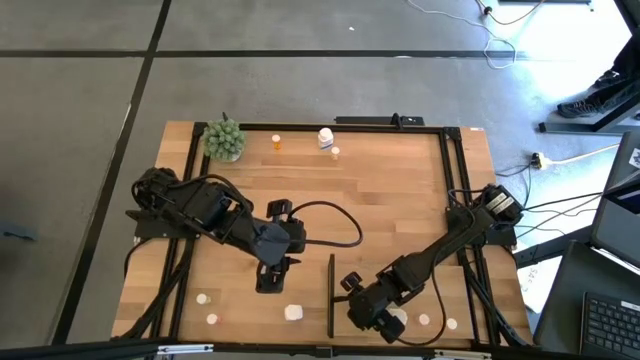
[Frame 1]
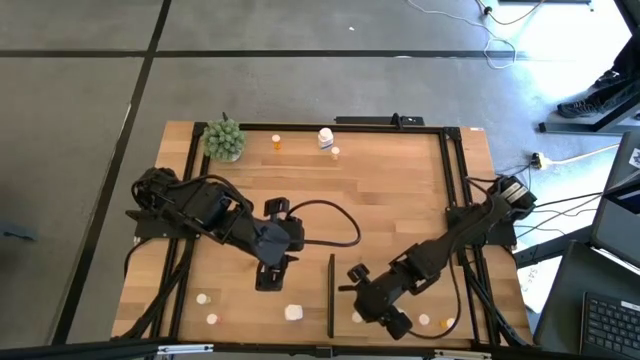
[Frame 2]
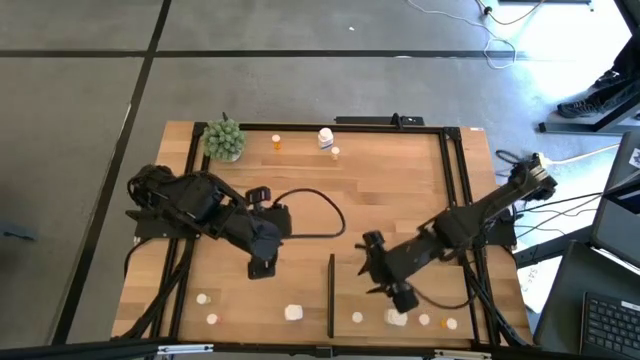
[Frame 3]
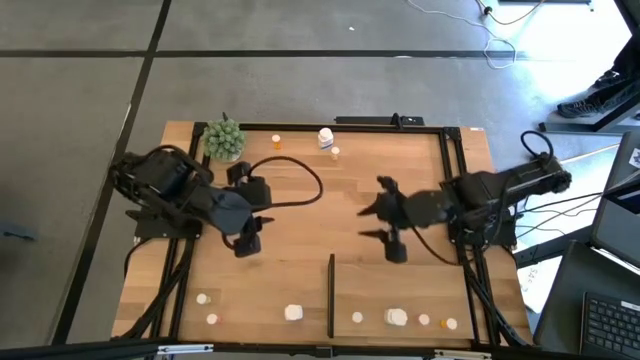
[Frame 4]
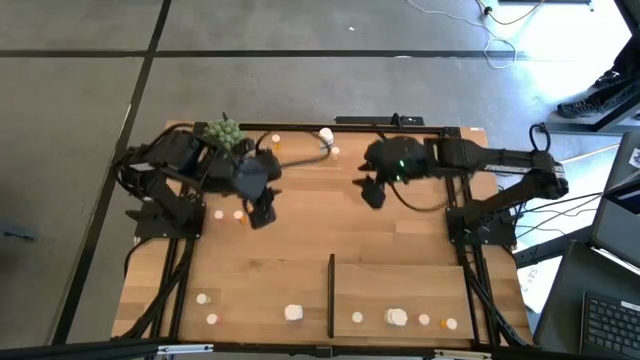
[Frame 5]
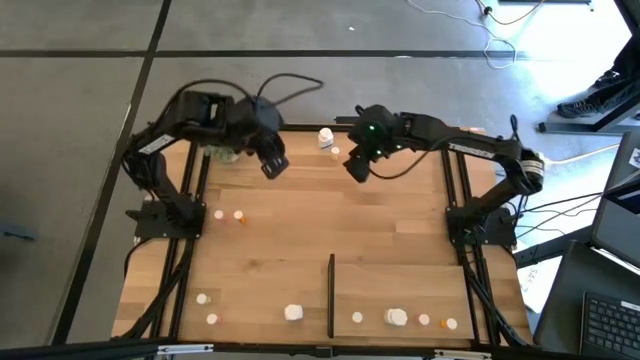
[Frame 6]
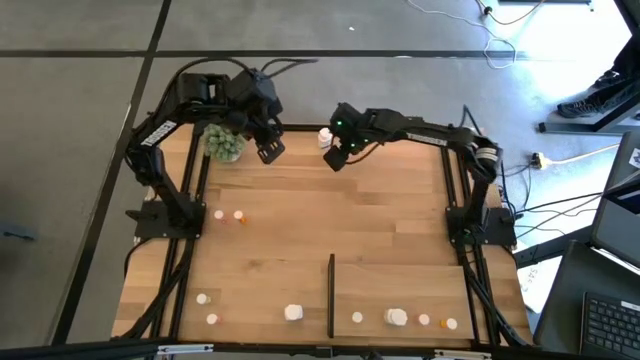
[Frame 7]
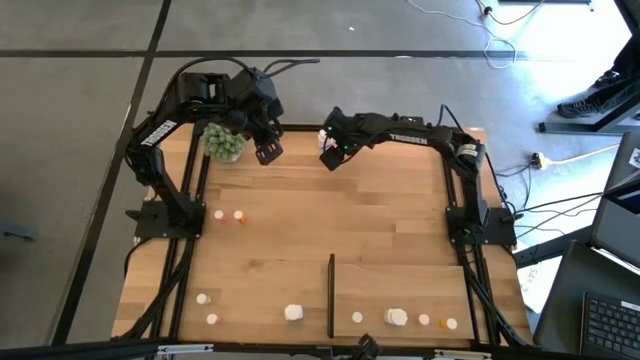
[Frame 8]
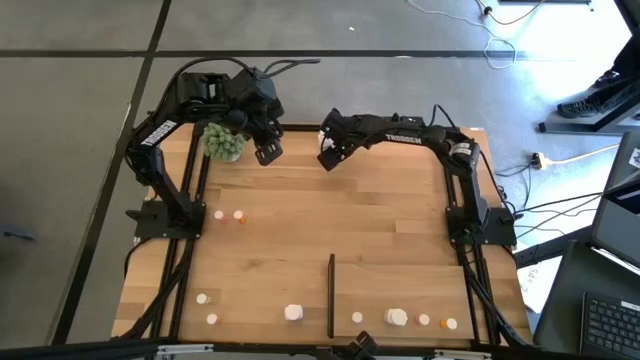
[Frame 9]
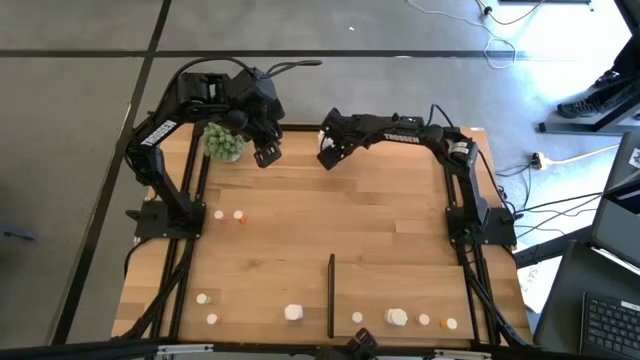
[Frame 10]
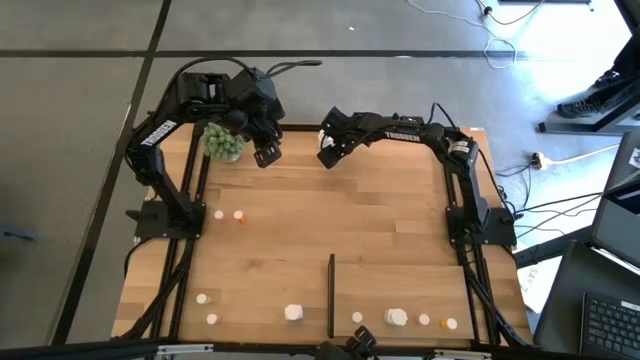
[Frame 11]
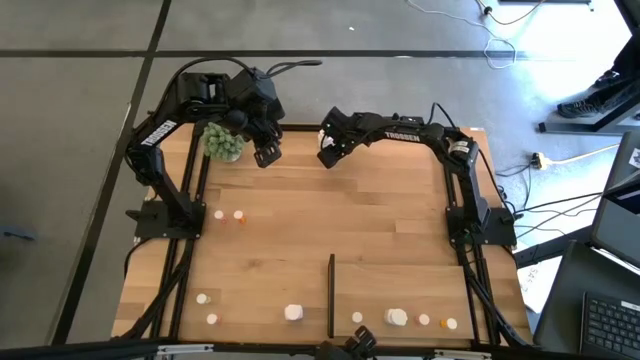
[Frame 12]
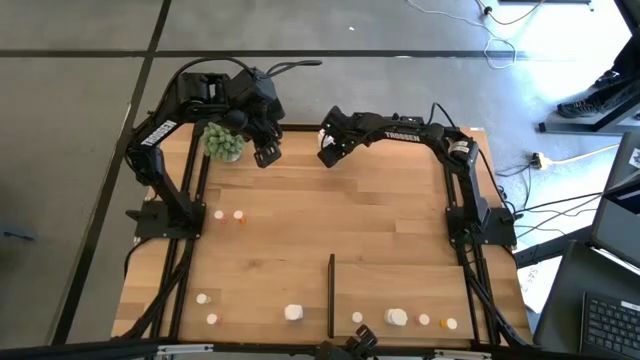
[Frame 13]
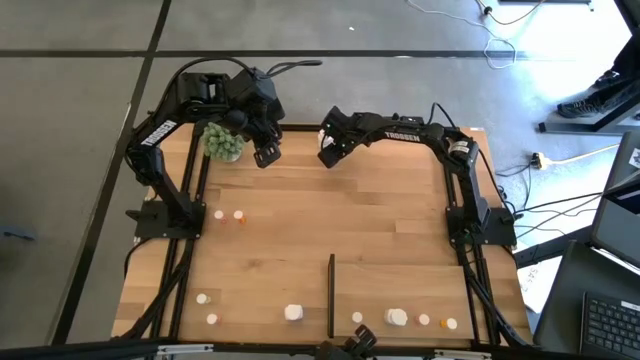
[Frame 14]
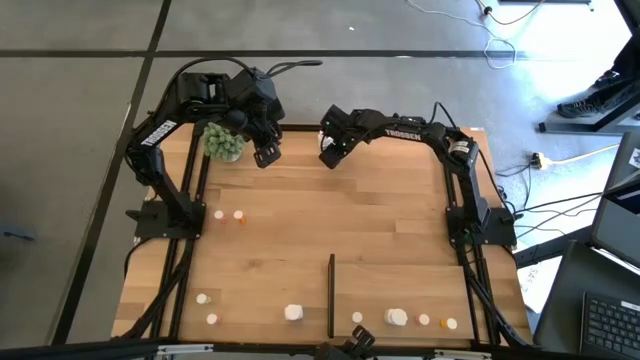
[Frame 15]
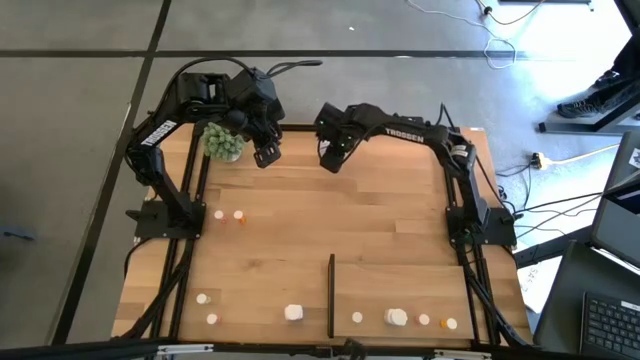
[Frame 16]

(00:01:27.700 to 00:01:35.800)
Task: Pick and place medicine bottles onto shelf by color
Put the top yellow pill bottle on the shelf aligned with the other yellow pill bottle

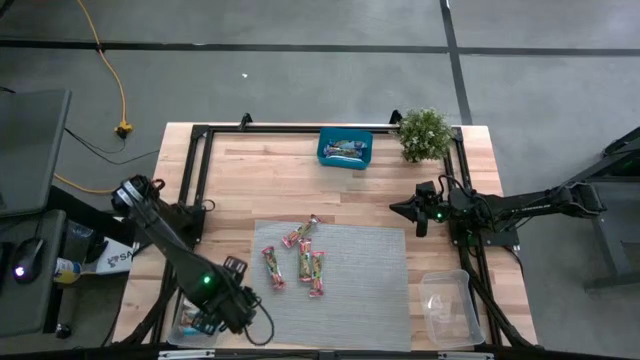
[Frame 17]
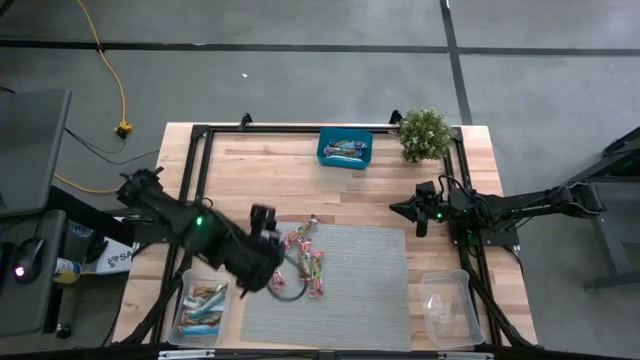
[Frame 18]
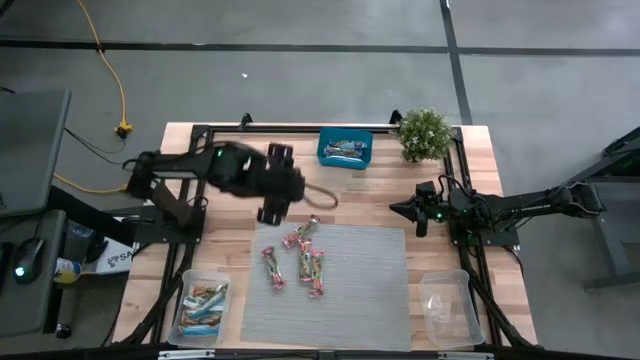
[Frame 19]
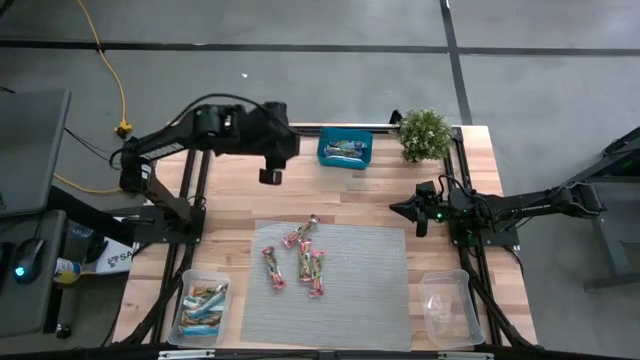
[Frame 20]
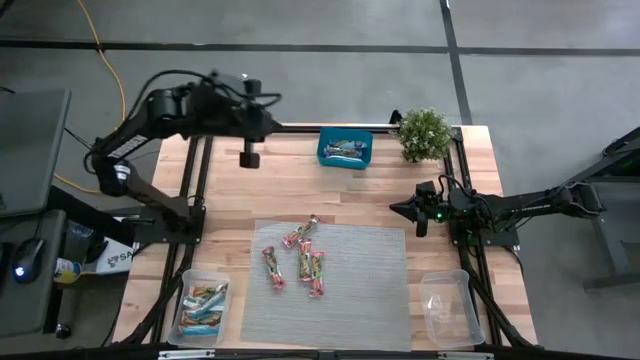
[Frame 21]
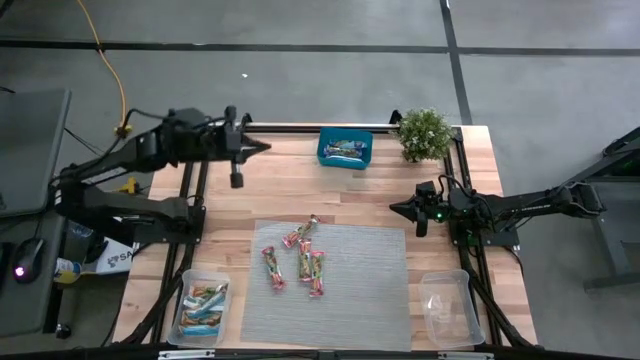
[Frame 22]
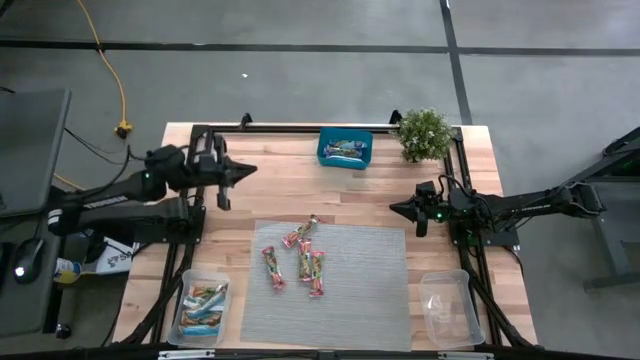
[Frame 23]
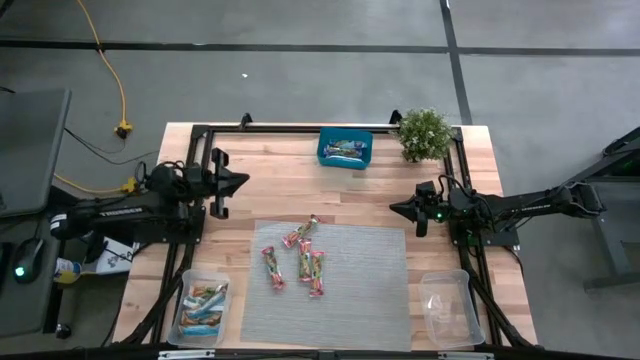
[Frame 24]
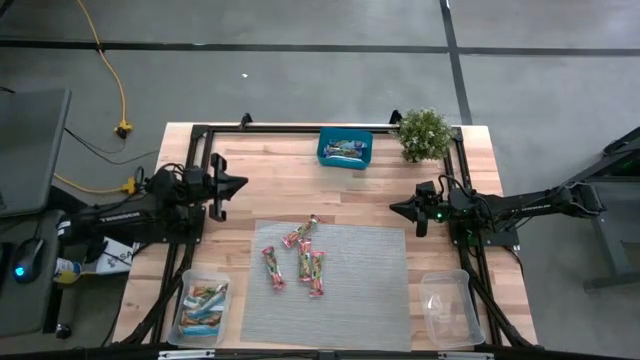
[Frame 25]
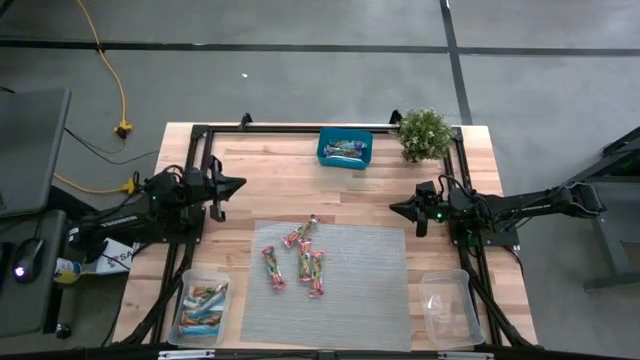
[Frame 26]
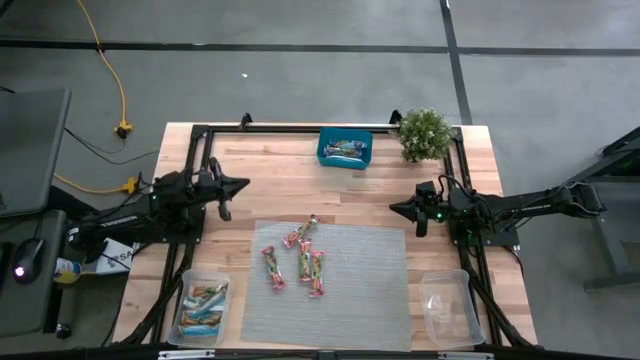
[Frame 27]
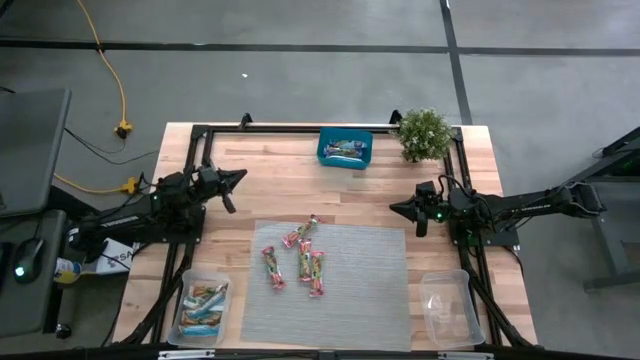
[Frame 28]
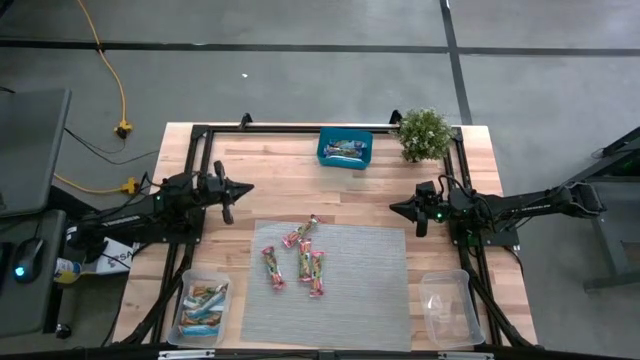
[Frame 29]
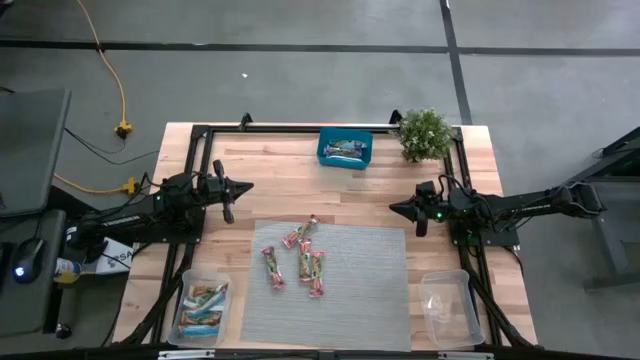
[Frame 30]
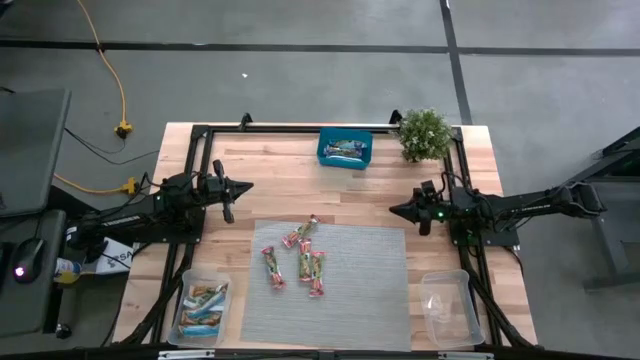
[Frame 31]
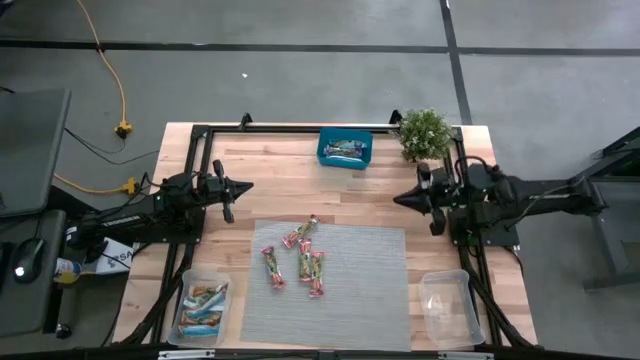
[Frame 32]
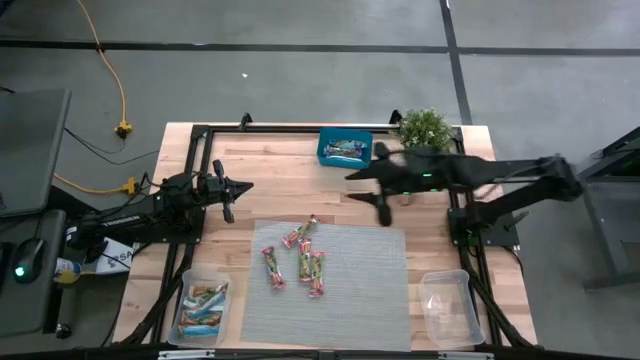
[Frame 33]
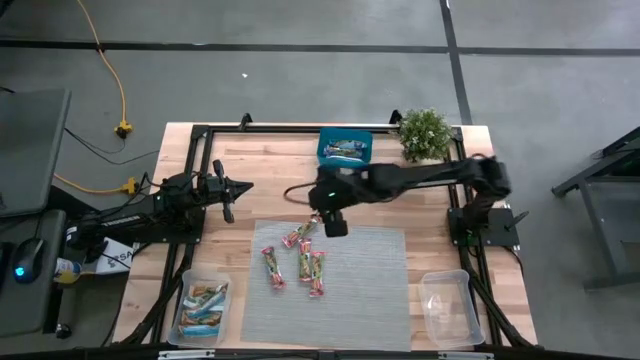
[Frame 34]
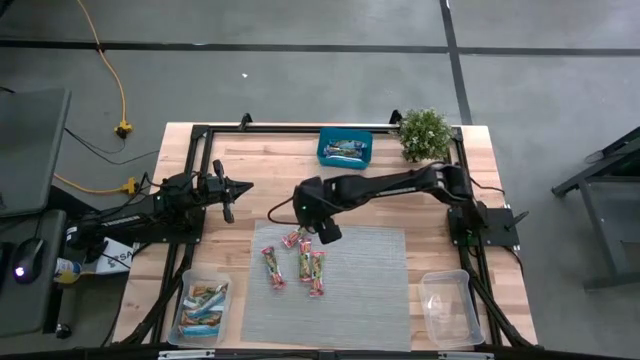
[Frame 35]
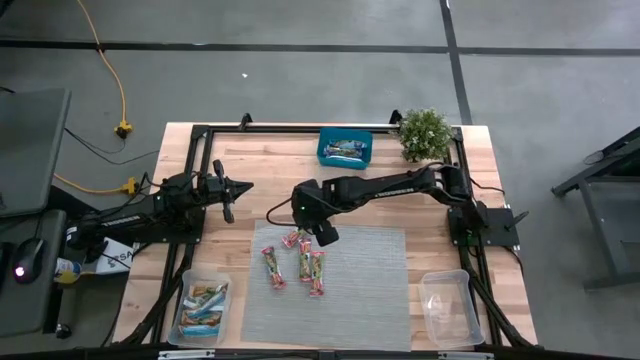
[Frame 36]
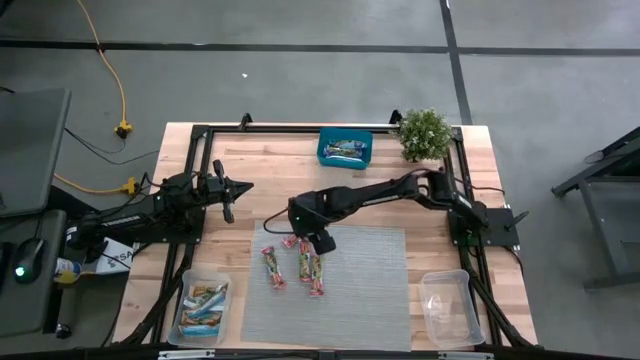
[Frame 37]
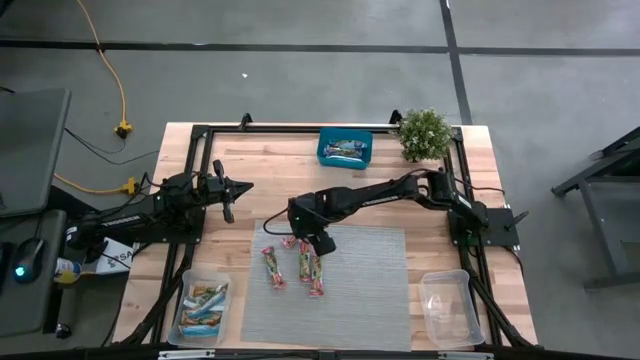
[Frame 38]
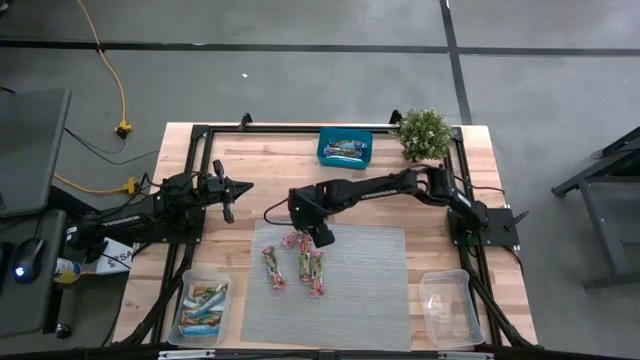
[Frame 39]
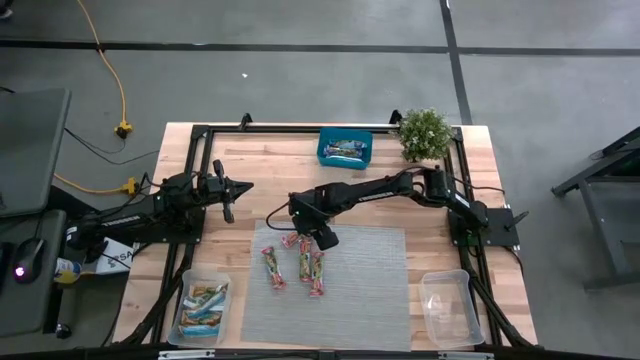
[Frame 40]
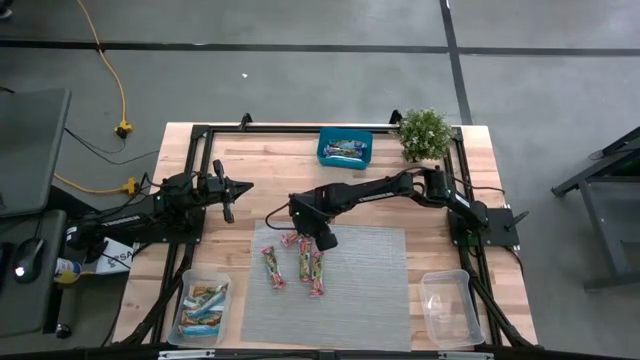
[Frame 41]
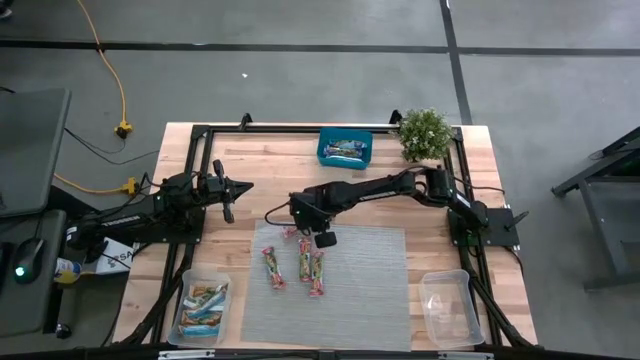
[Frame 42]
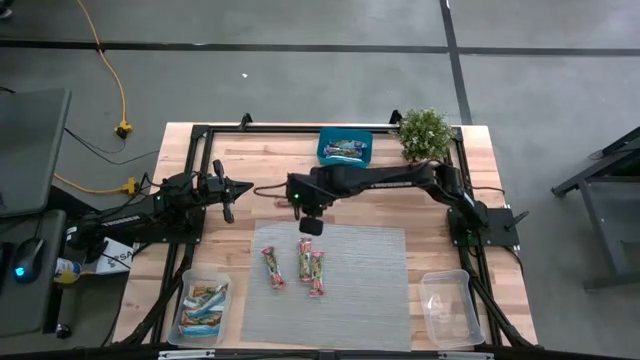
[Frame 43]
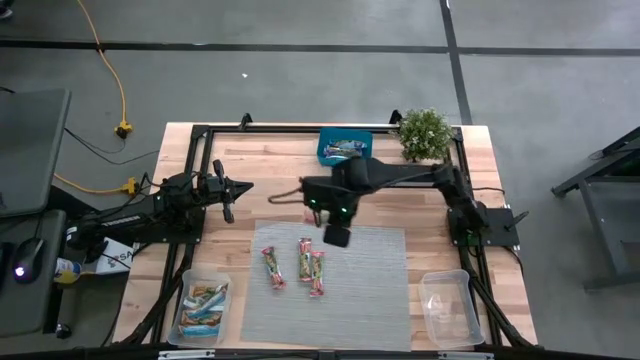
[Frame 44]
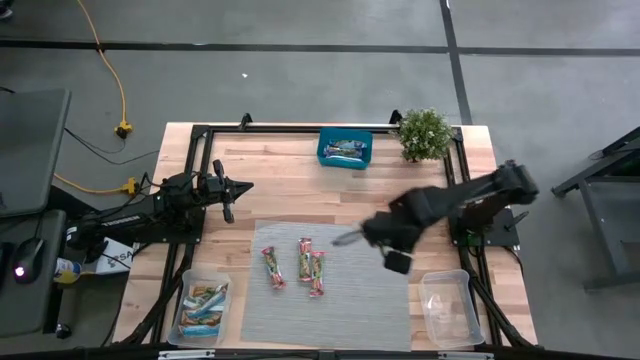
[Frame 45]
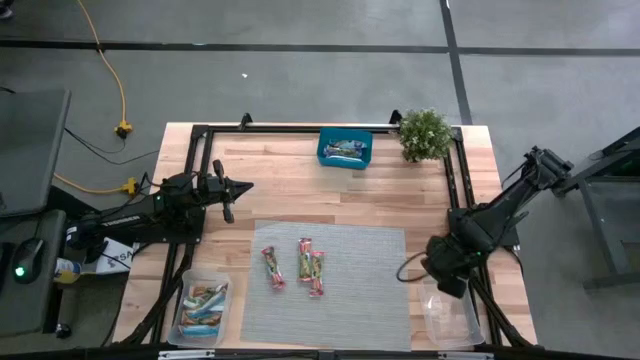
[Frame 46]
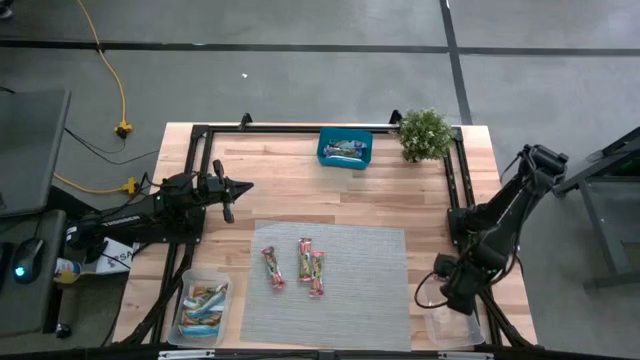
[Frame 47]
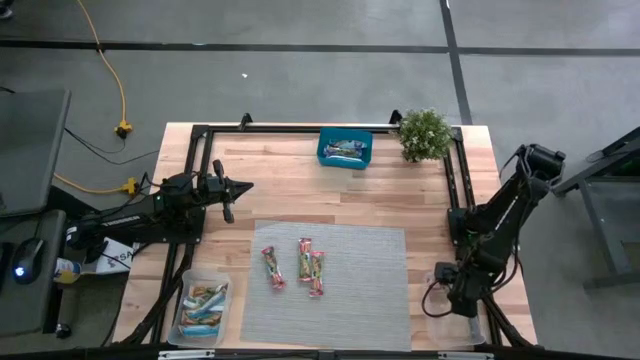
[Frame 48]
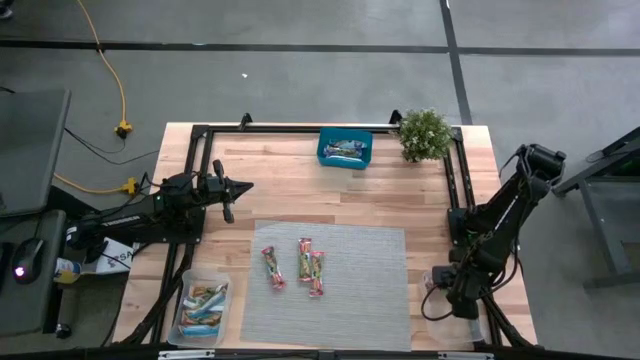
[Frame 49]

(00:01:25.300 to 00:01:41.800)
Task: Pick and place Granola Bars by type
Put the red granola bar into the right transparent bin
